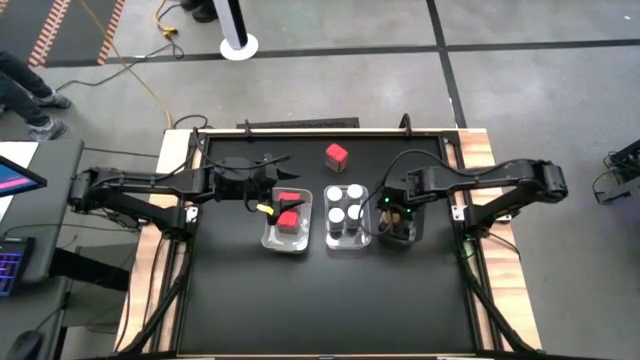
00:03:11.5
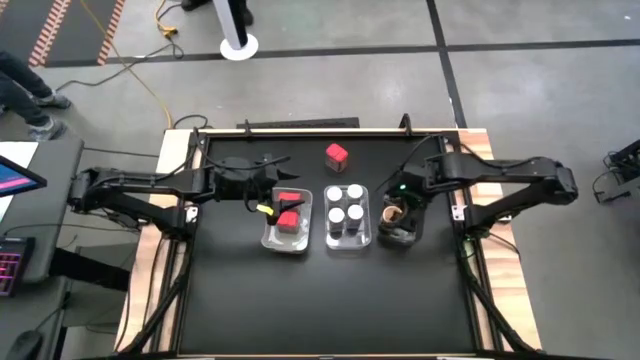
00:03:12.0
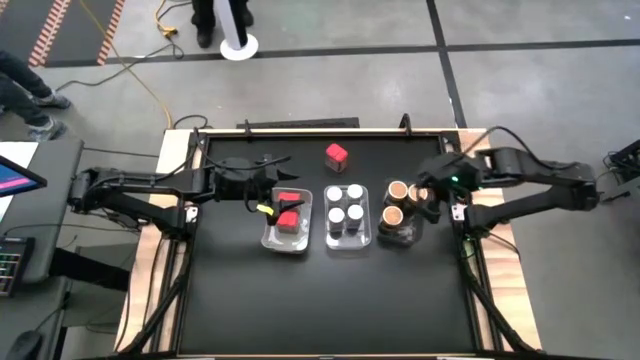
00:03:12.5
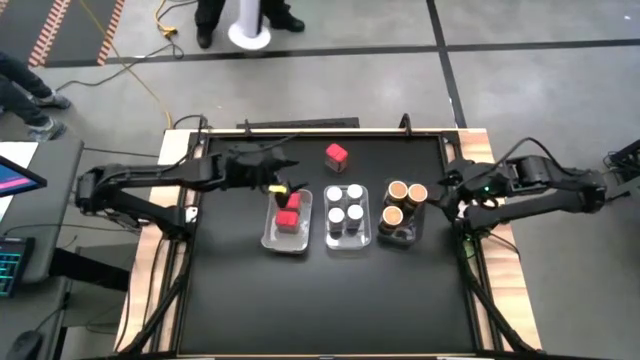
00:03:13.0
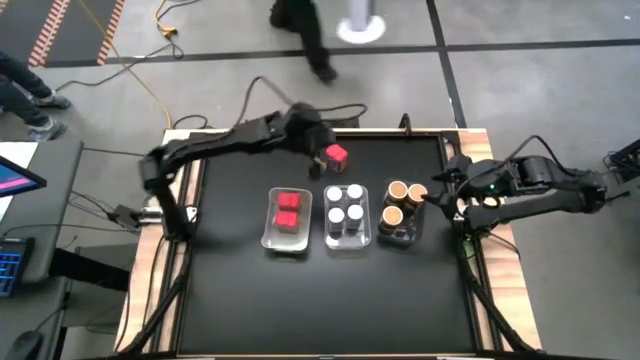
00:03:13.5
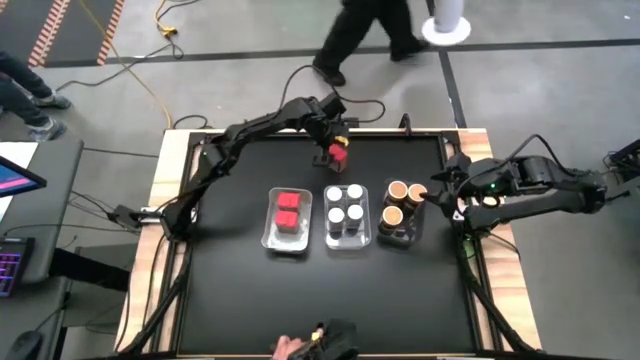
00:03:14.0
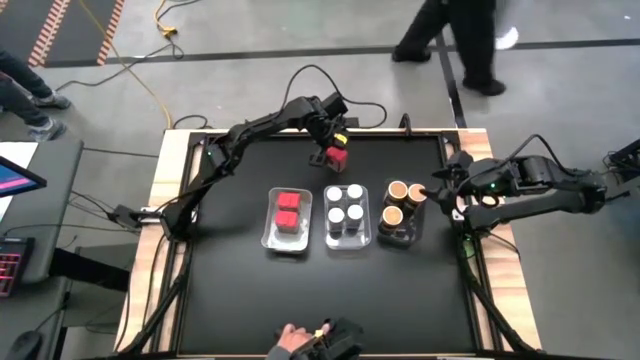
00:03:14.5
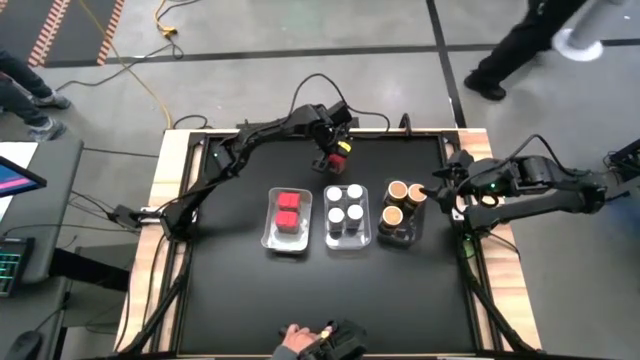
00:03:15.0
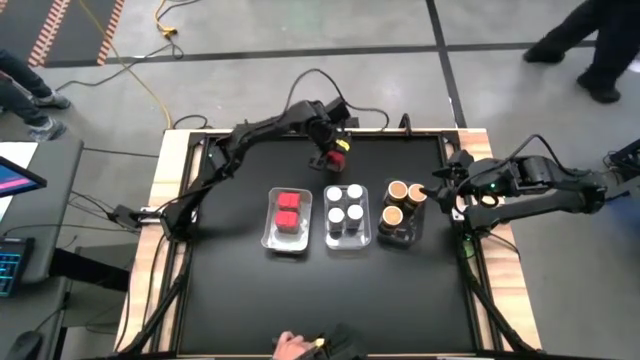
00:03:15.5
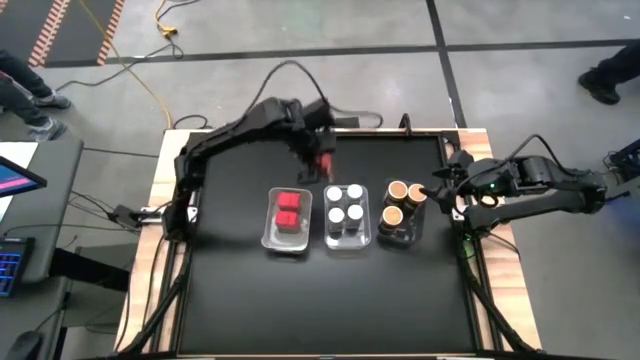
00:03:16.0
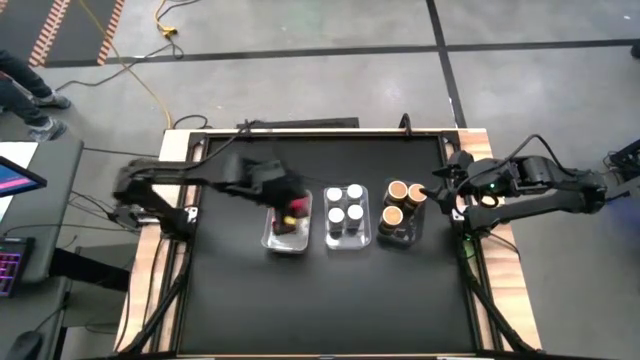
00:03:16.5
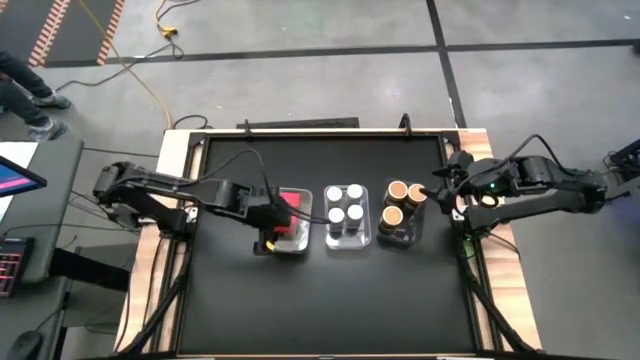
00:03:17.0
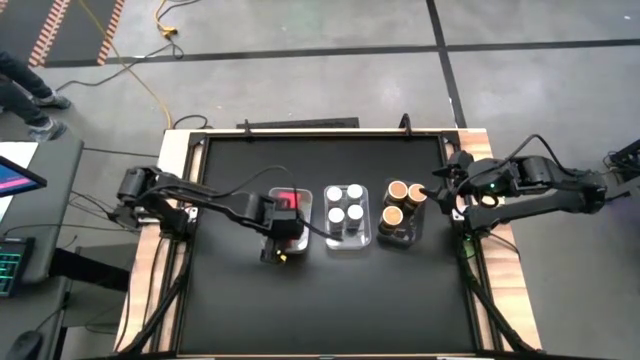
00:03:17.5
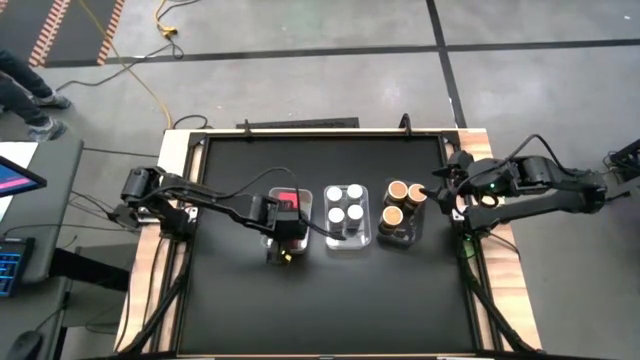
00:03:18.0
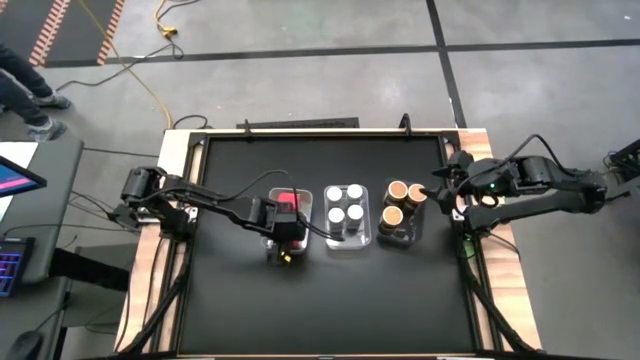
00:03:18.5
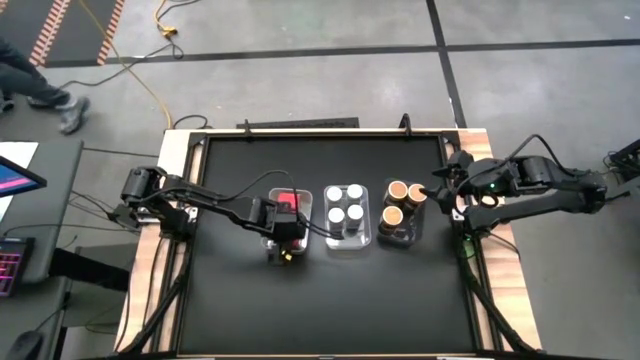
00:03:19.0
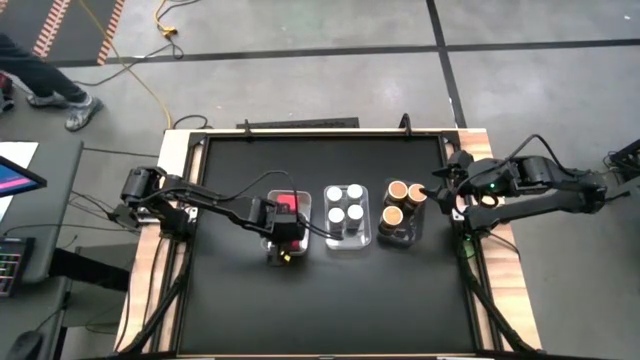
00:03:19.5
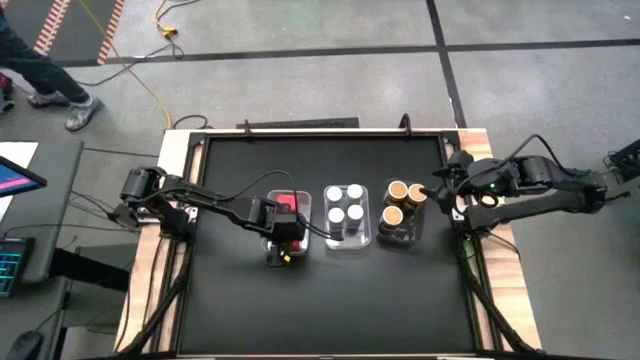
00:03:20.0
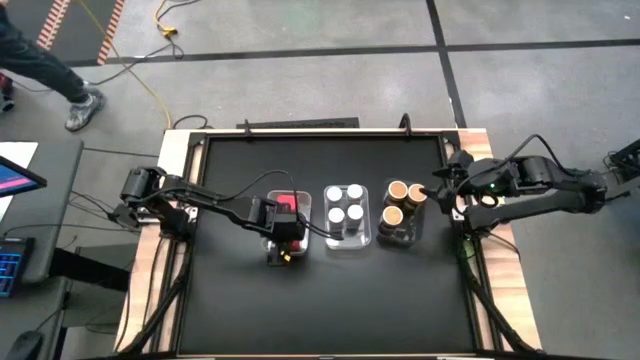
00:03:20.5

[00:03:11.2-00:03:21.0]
Task: Sort spices by type
Put the red seasoning can into the white bin

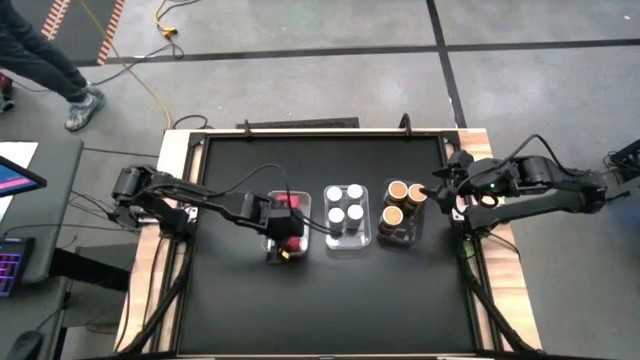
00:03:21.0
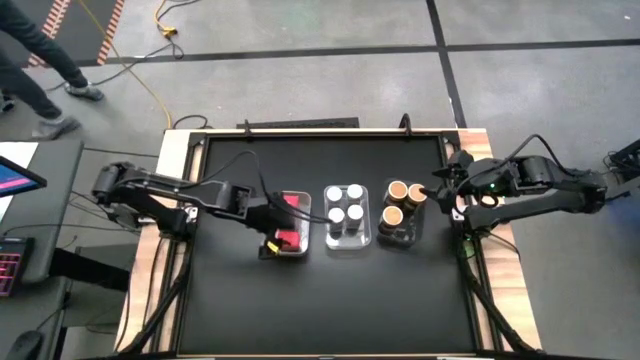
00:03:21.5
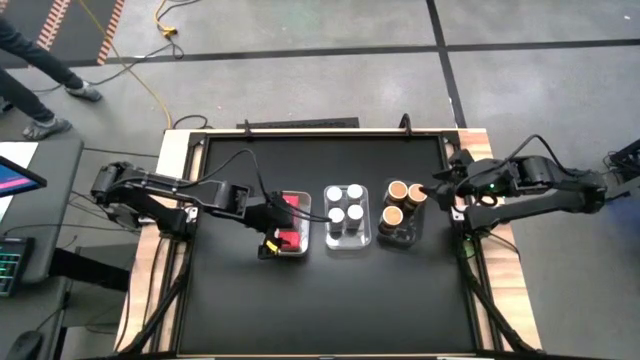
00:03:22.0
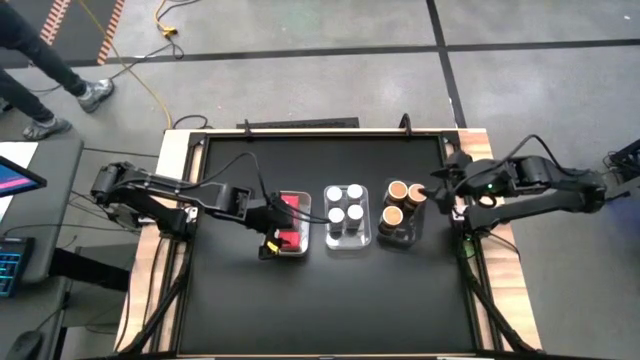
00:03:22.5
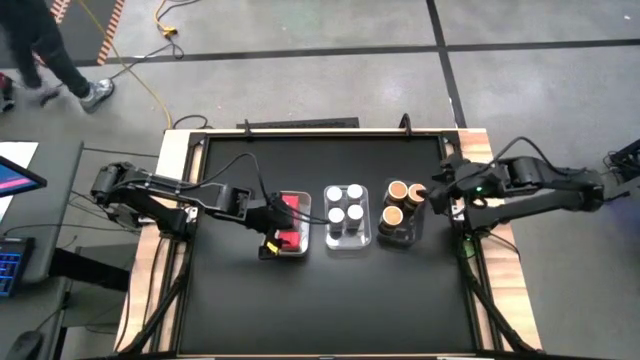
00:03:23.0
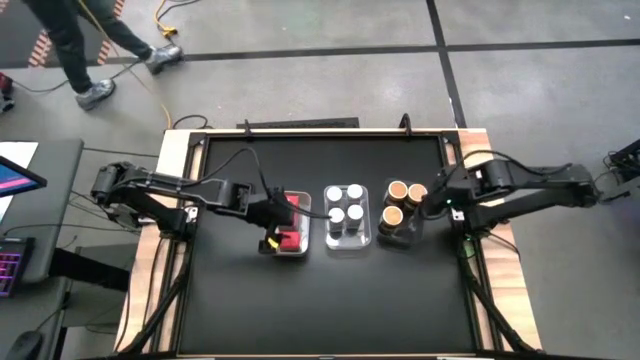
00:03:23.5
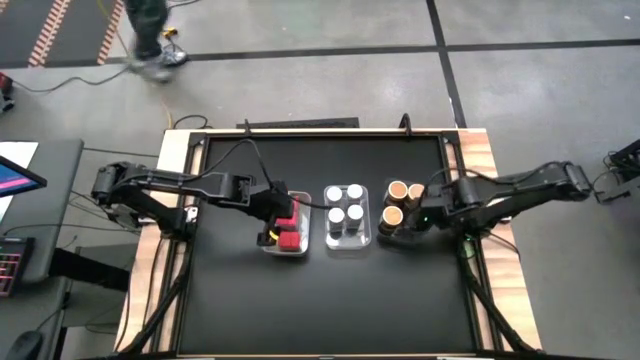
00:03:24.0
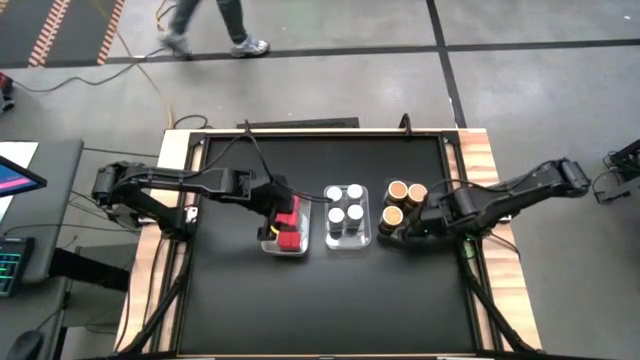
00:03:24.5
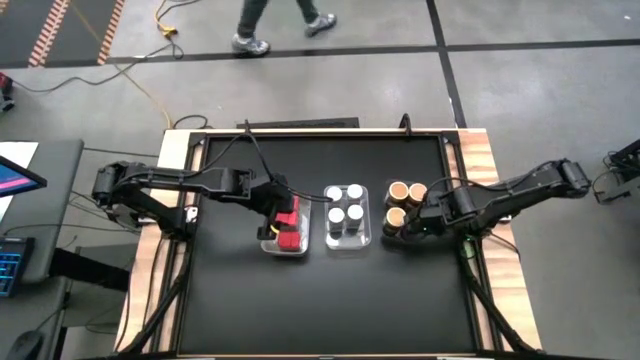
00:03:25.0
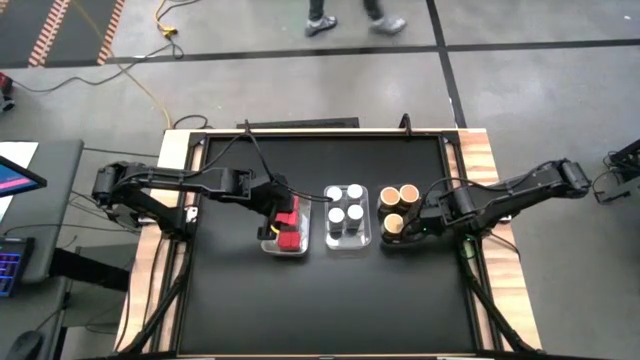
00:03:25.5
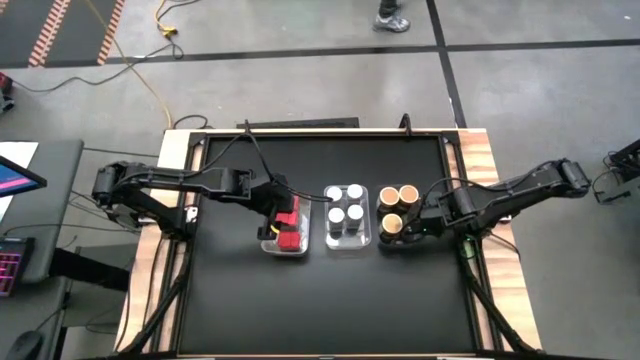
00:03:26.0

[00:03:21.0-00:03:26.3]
Adjust the black bin beside the transparent bin

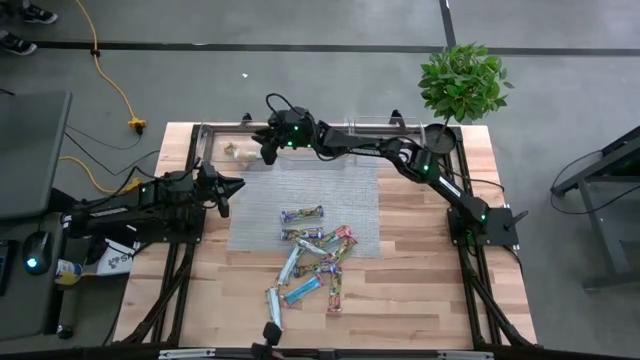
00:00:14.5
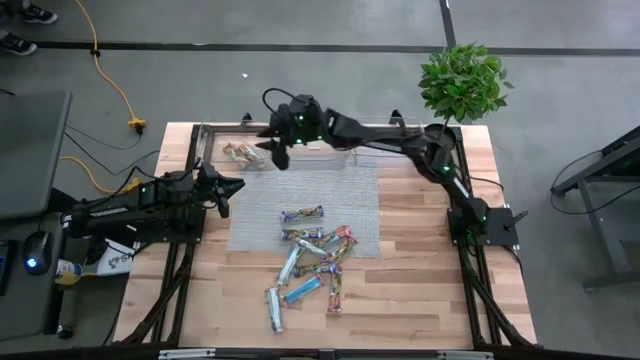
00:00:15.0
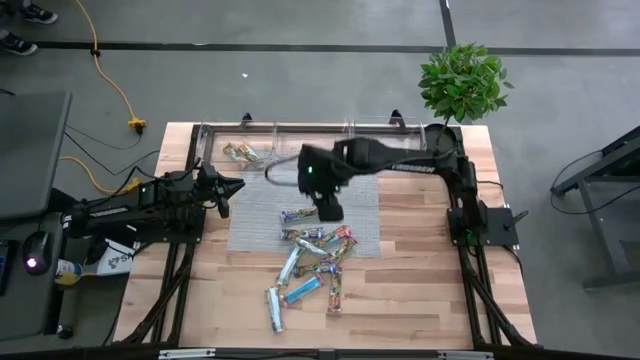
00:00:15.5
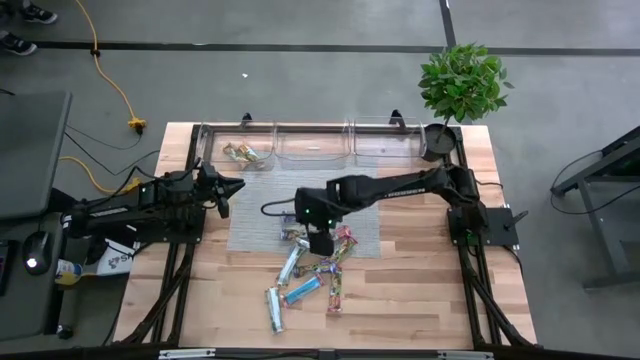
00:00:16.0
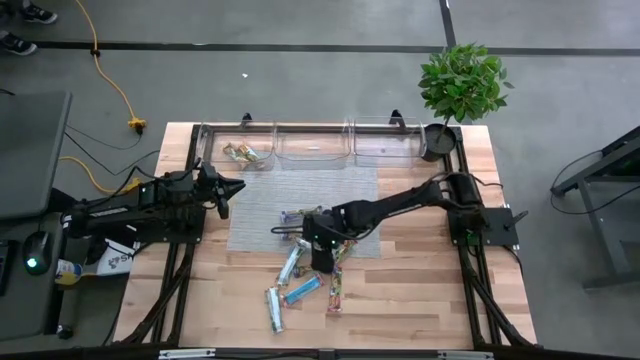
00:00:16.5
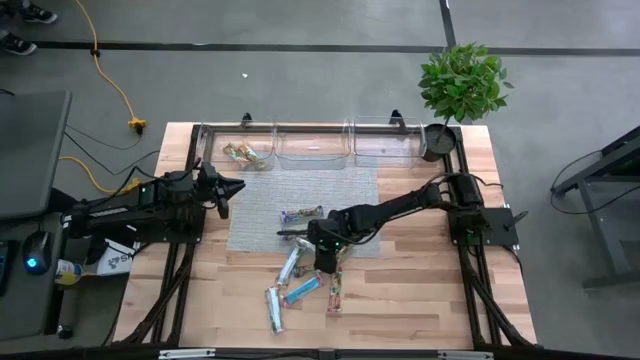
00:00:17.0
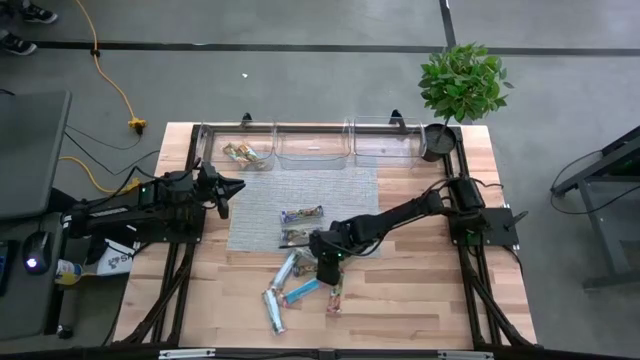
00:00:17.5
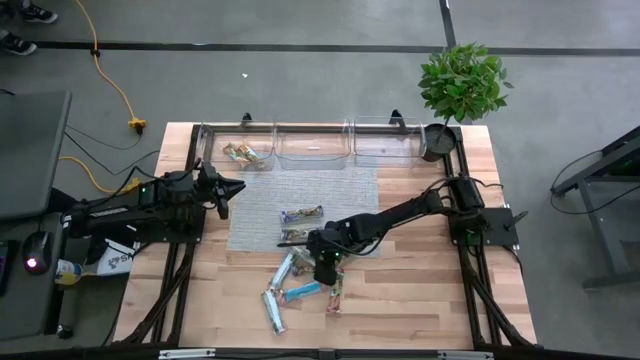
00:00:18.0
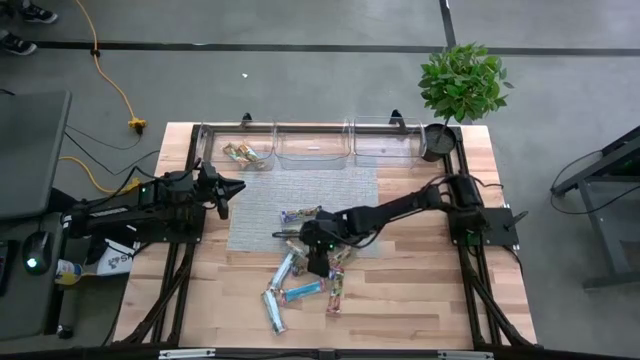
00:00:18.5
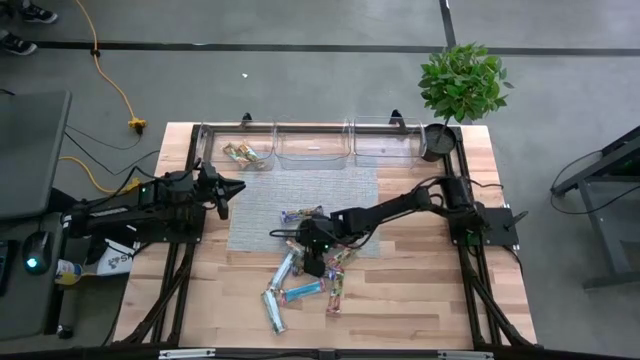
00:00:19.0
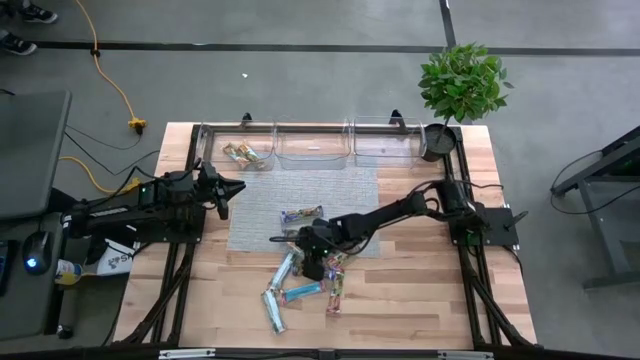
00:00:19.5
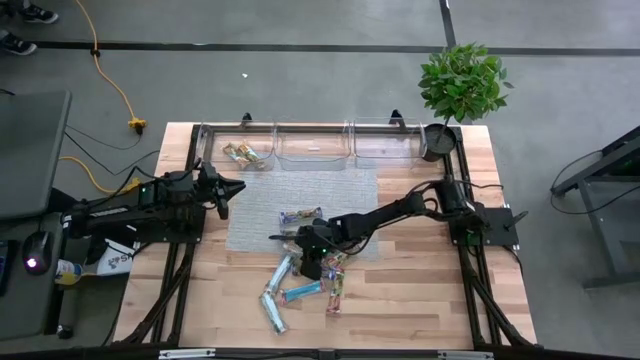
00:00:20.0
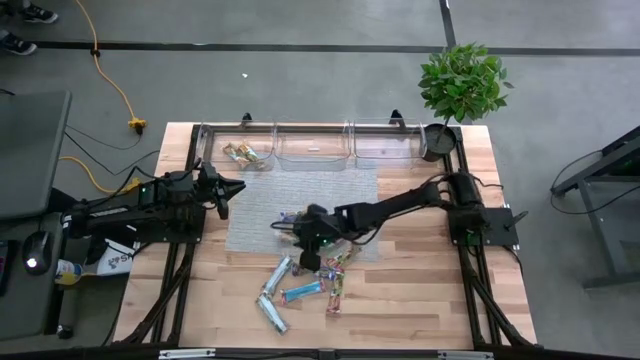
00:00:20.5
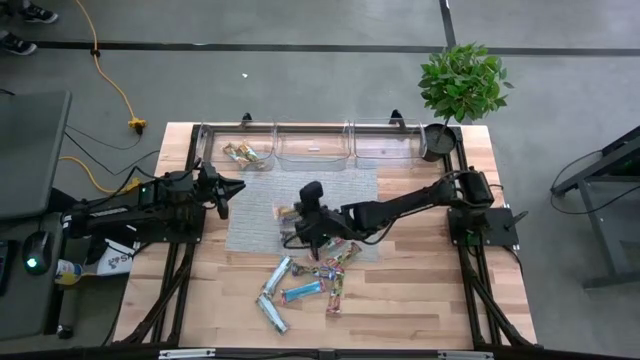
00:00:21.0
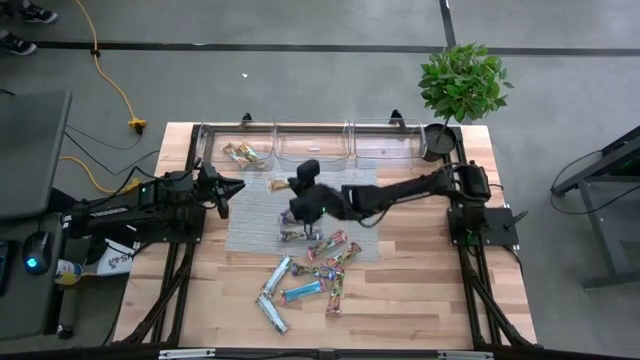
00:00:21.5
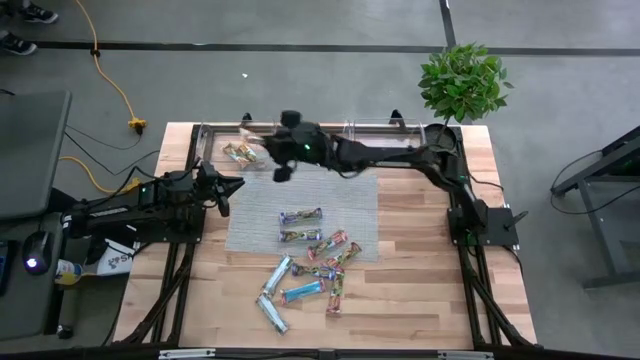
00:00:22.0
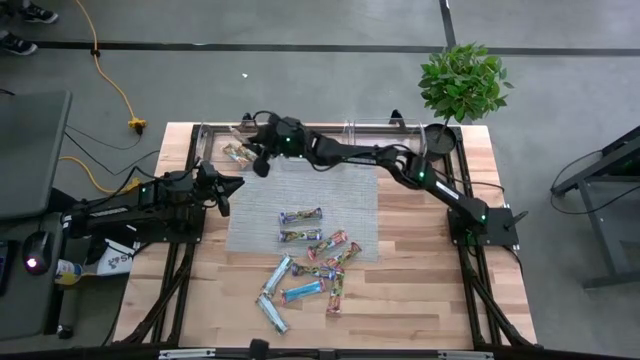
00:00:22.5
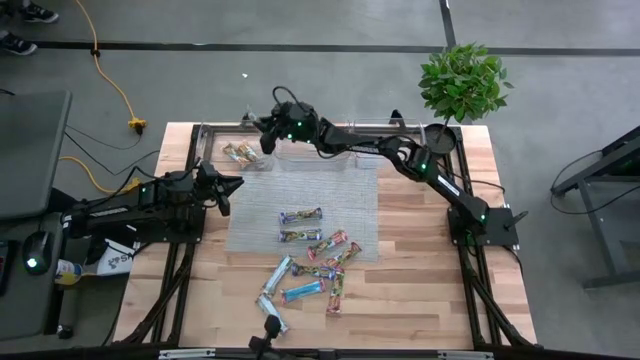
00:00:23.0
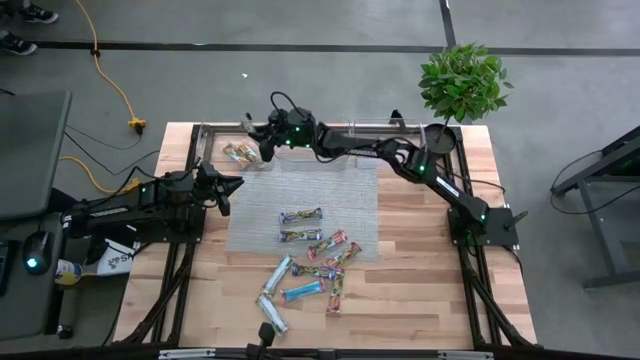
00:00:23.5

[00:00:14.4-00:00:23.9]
Task: Pick and place Granola Bars by type
Put the yellow granola bar into the left transparent bin
